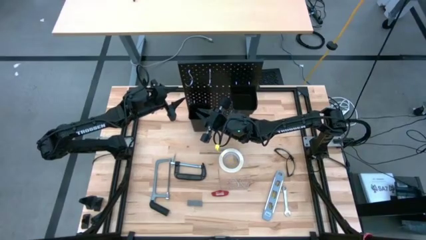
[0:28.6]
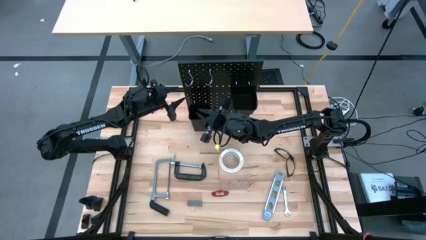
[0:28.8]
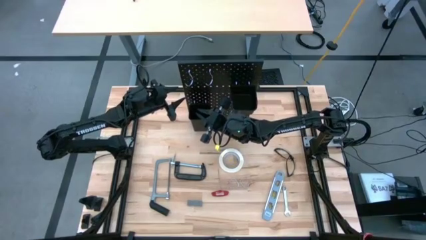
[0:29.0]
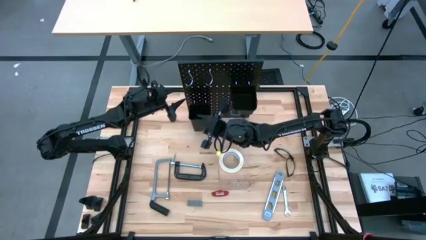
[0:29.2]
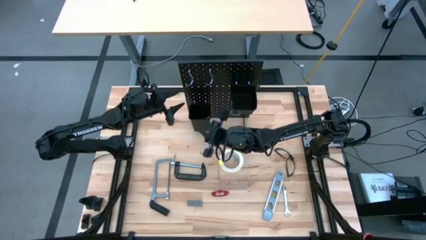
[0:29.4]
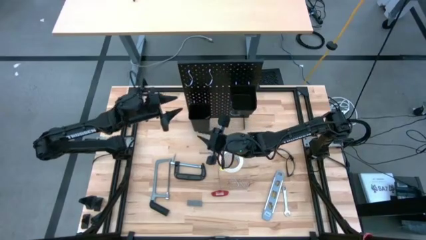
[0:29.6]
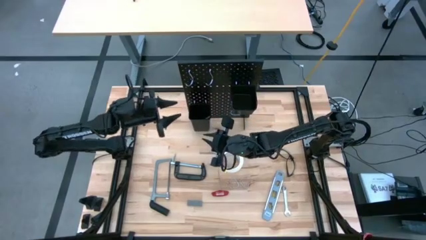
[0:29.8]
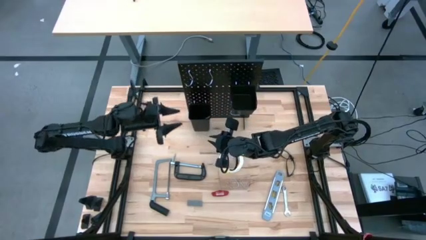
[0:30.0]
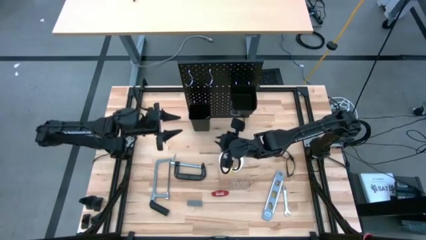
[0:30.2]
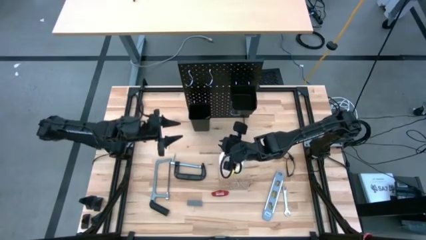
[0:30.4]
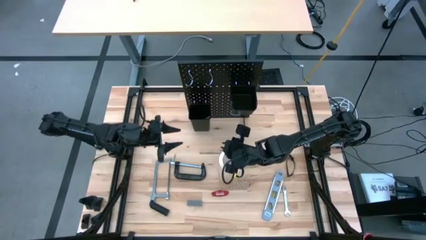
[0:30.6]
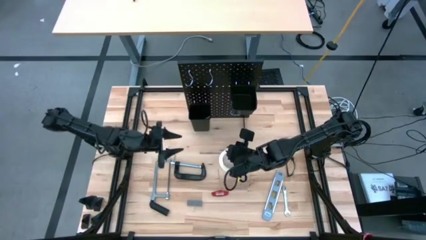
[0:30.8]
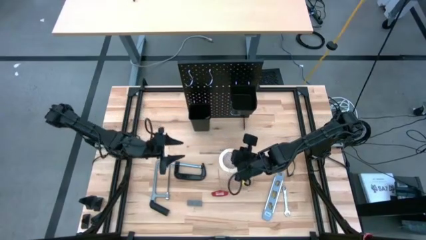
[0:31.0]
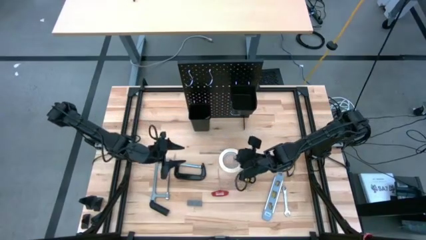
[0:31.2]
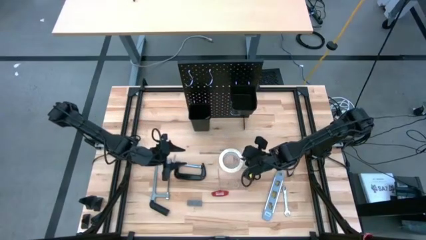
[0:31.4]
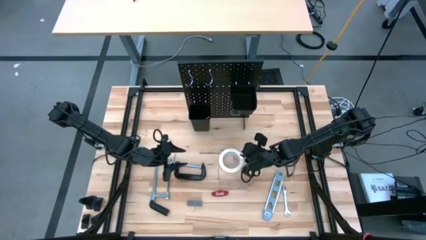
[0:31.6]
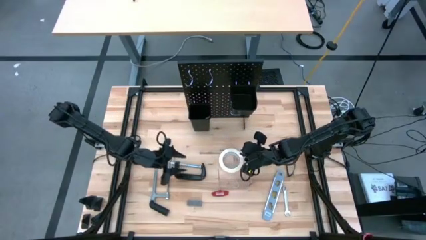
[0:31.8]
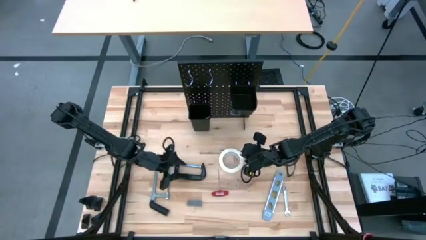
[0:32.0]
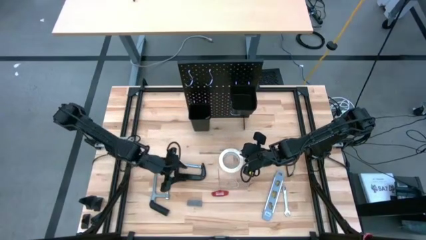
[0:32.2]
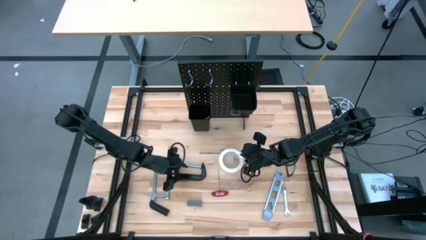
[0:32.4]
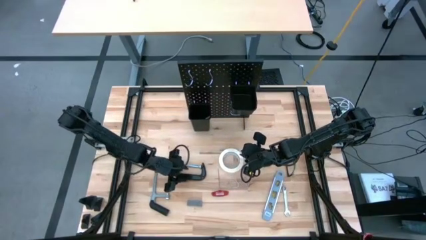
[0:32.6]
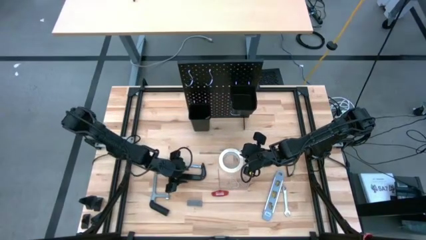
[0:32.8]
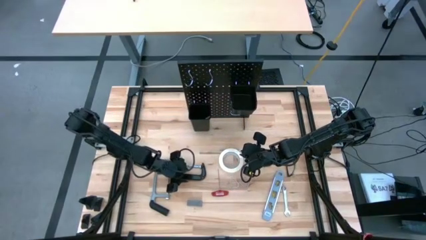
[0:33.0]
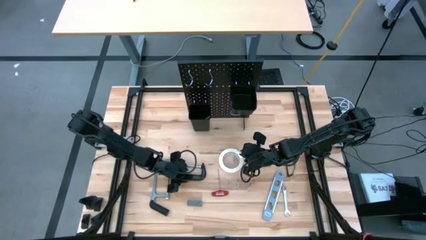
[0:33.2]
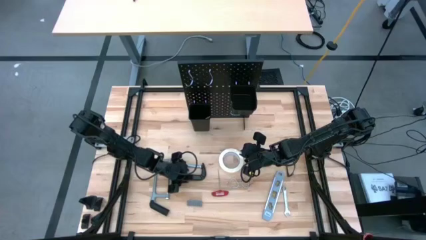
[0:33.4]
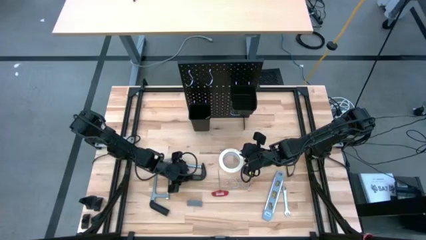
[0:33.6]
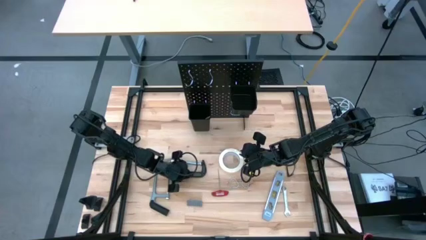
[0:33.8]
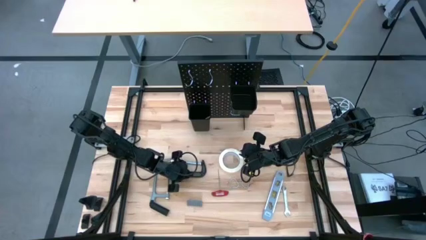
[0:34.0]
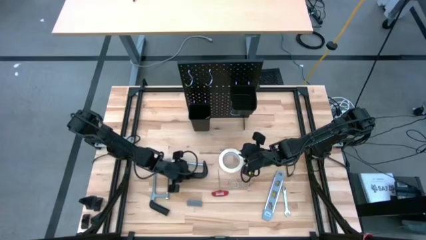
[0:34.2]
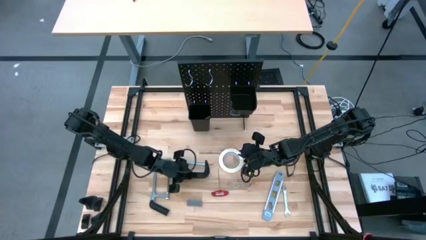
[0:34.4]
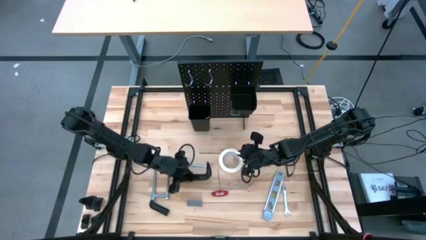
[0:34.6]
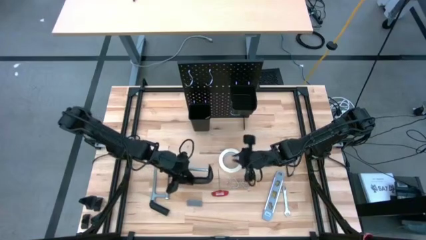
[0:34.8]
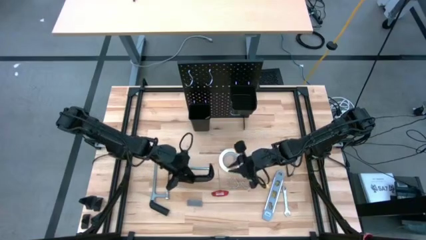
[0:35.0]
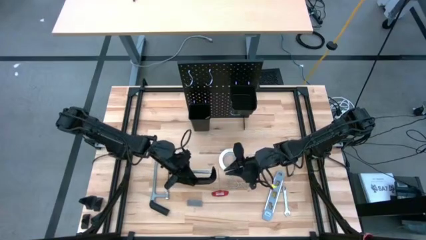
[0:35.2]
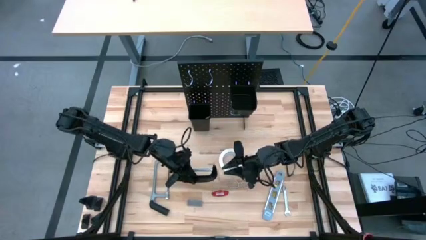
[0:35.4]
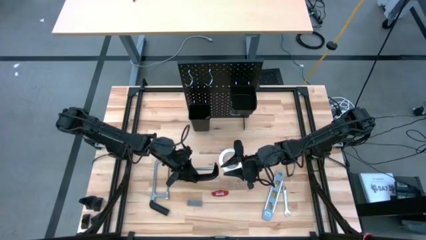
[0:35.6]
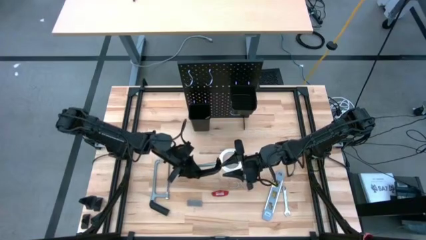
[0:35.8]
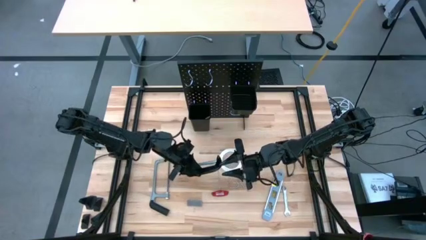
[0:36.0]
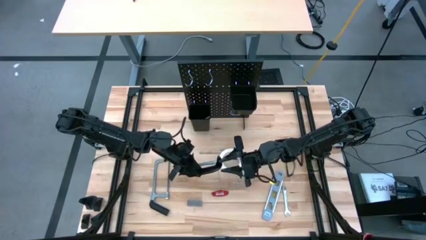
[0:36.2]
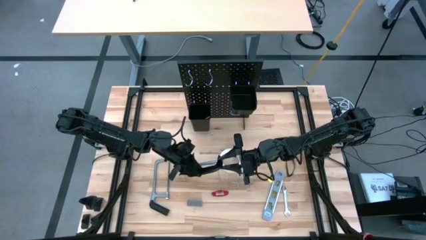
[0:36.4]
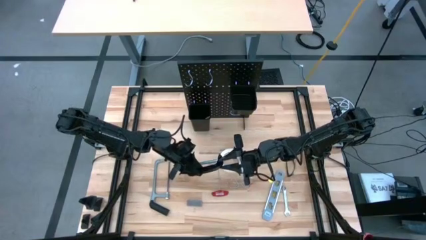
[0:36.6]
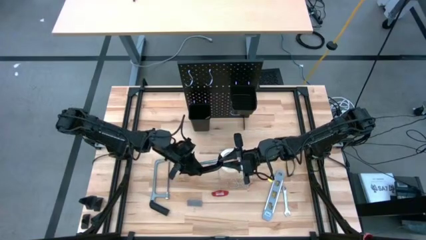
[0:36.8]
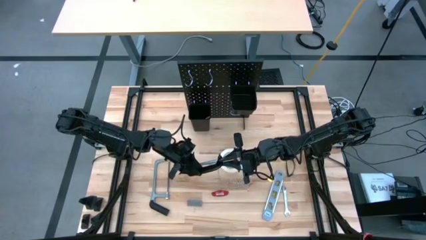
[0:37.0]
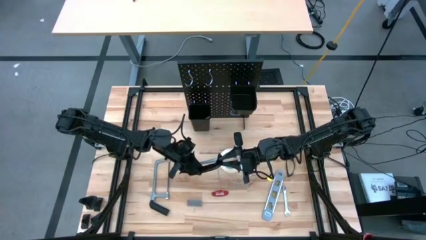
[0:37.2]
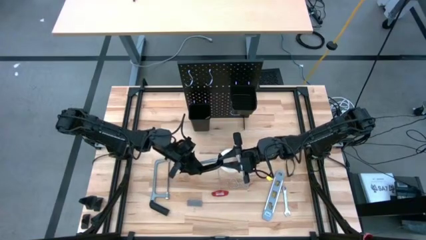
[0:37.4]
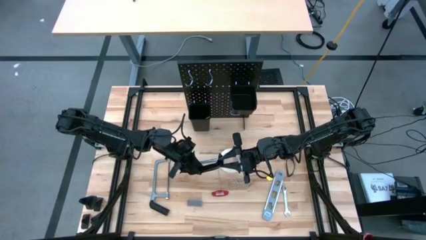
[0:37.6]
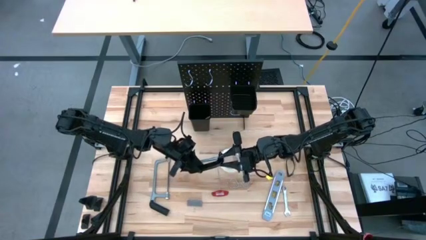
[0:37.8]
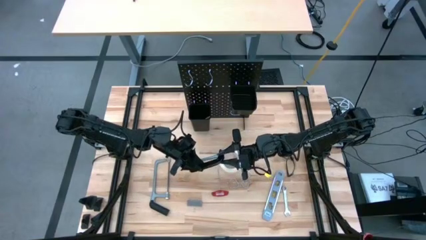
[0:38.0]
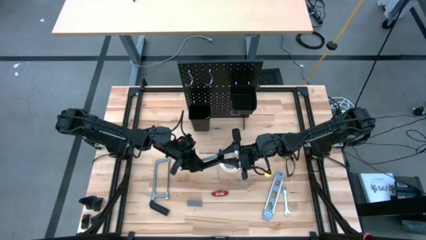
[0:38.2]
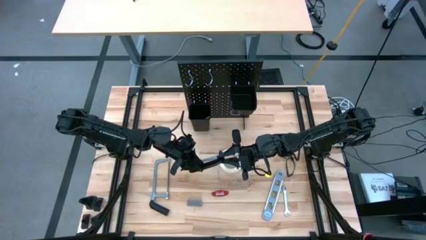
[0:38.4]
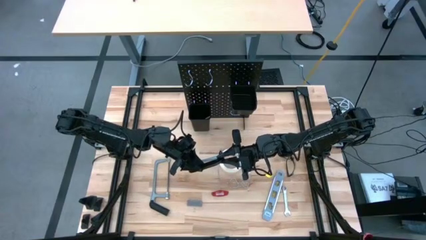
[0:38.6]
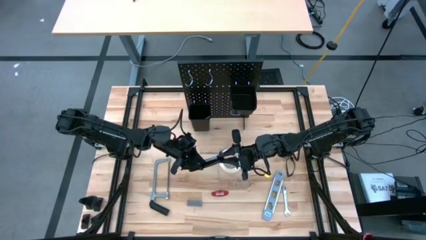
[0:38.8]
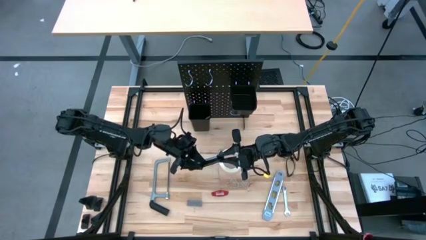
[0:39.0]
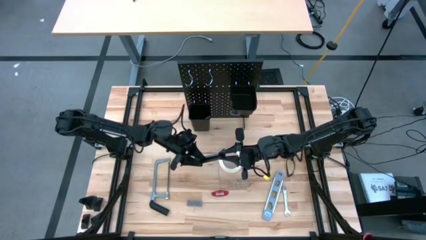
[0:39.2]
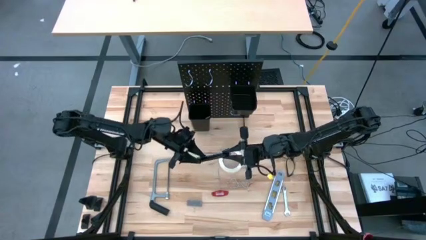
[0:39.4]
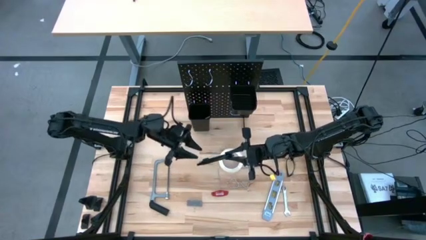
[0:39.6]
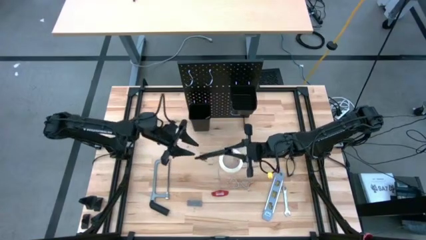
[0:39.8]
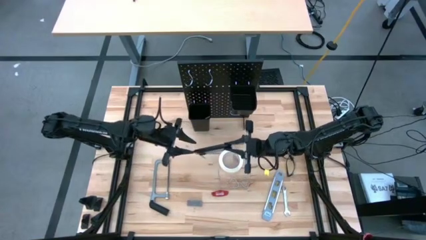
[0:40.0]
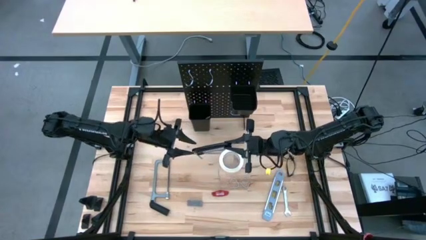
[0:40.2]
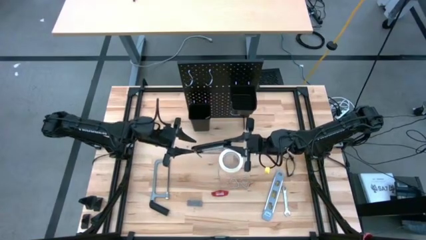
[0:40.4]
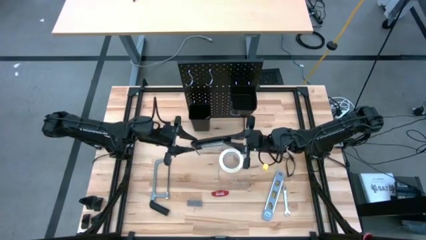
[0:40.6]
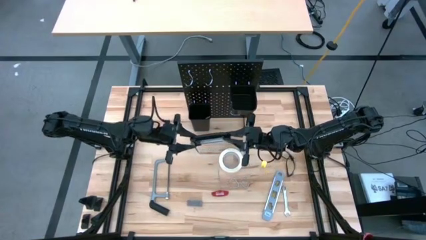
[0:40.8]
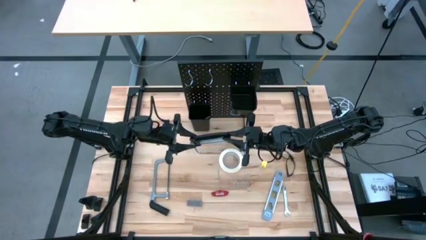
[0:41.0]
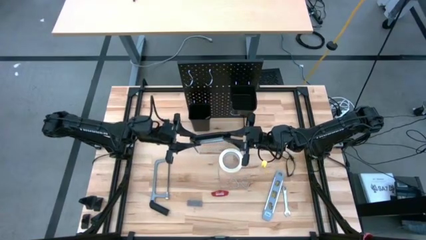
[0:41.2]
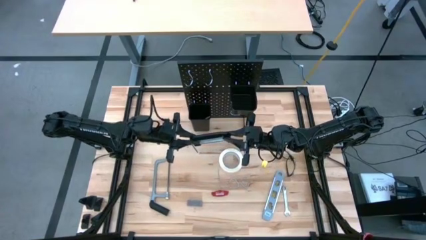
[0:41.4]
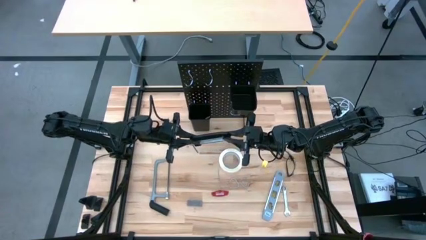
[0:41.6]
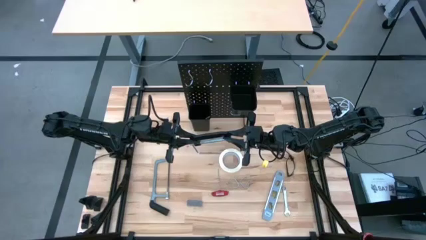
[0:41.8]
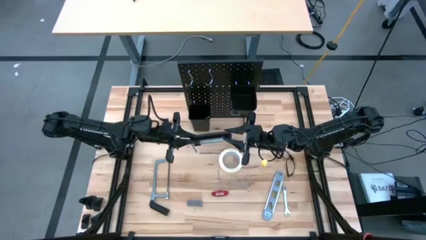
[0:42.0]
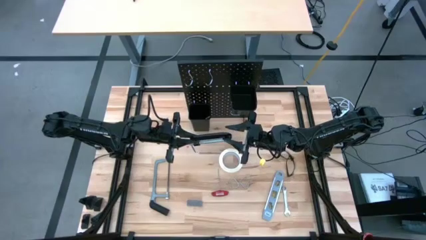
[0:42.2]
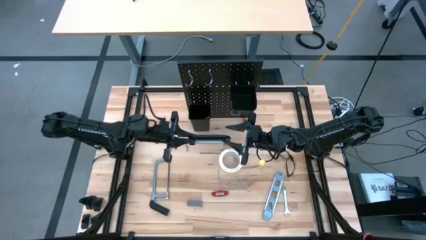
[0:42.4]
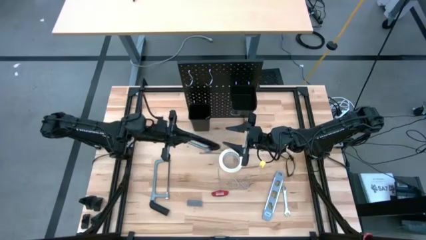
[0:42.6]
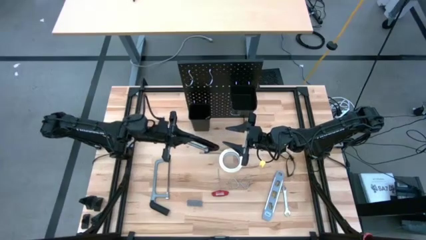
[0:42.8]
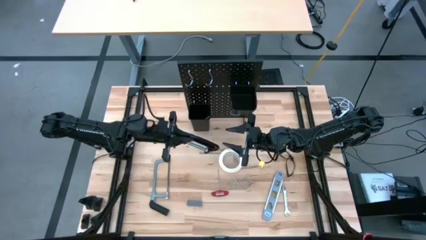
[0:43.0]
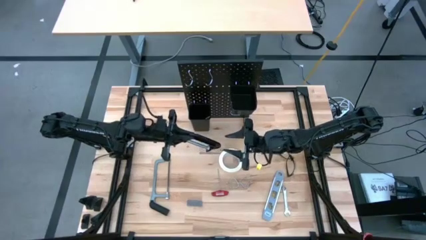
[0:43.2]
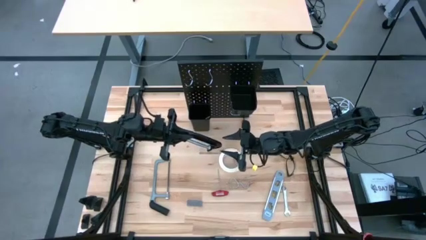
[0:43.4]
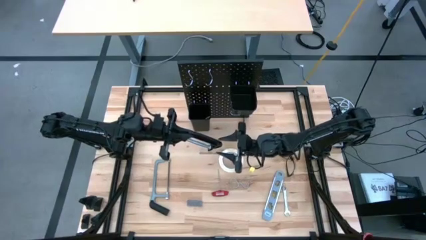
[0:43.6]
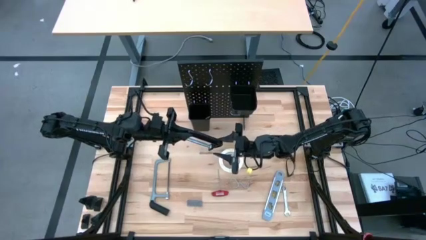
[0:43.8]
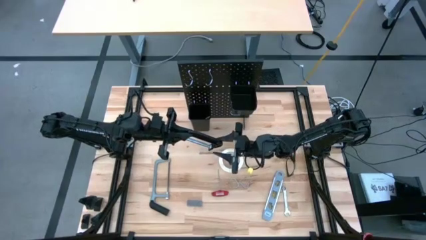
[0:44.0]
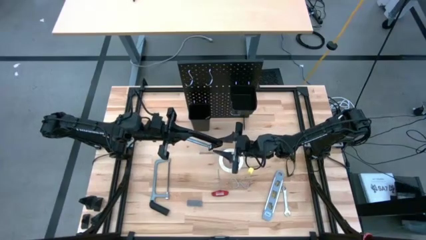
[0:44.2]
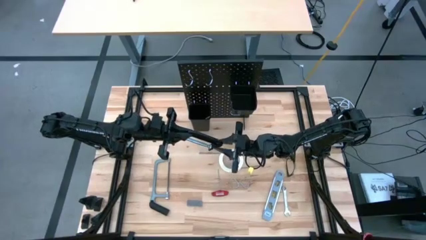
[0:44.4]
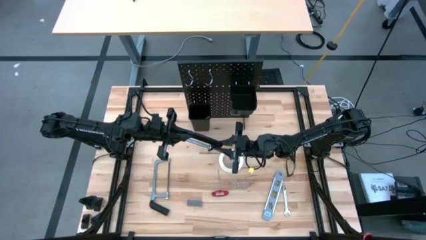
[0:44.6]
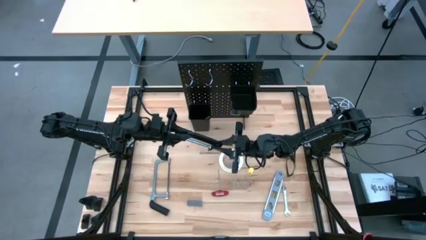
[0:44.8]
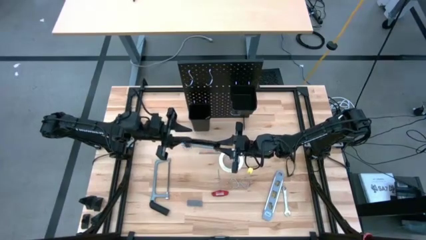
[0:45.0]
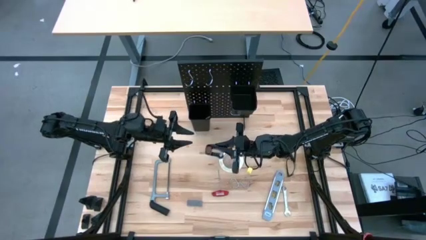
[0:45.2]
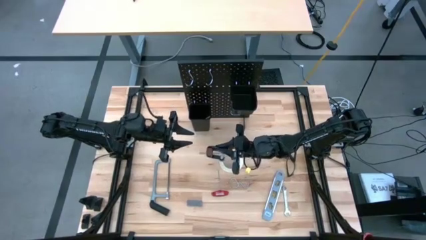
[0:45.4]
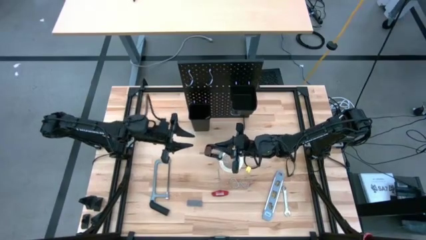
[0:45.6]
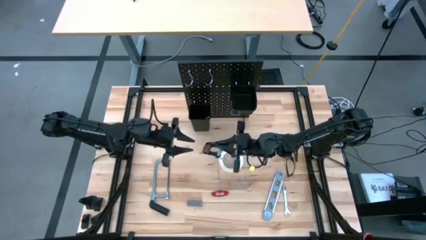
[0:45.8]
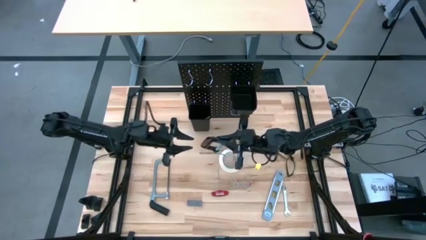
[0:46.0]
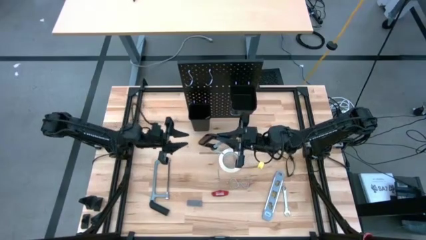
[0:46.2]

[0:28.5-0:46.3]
Task: Hang tools onto peg board
Hang the black c clamp on the black peg board
